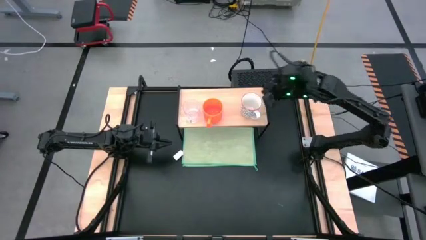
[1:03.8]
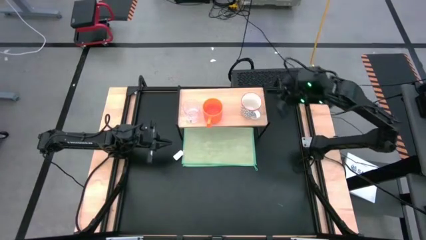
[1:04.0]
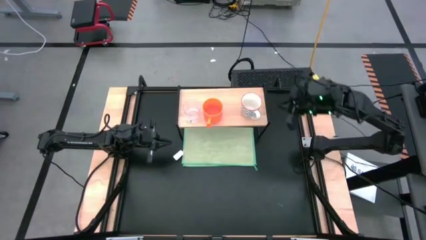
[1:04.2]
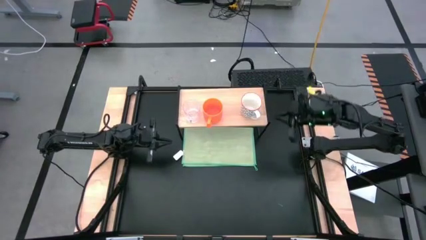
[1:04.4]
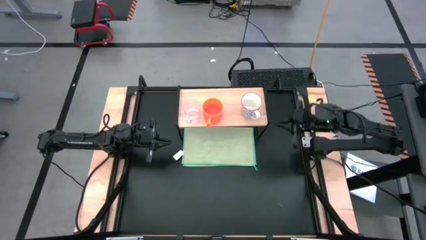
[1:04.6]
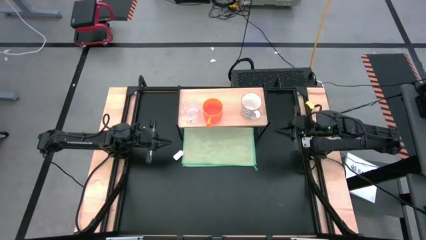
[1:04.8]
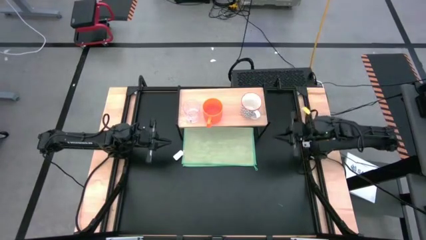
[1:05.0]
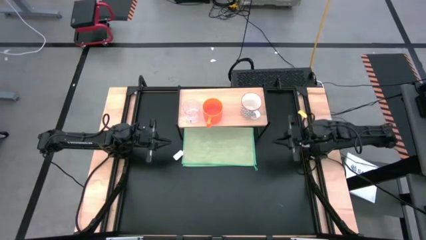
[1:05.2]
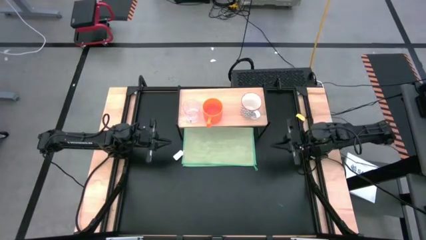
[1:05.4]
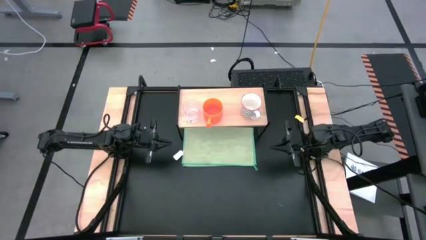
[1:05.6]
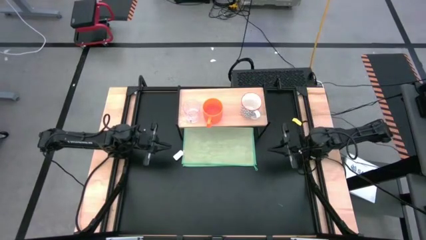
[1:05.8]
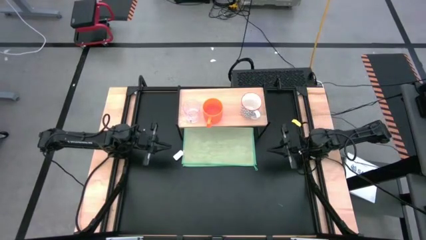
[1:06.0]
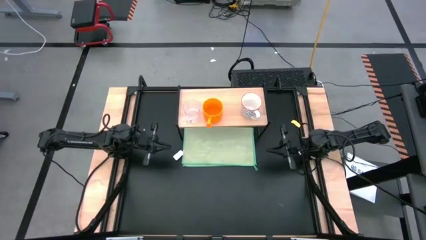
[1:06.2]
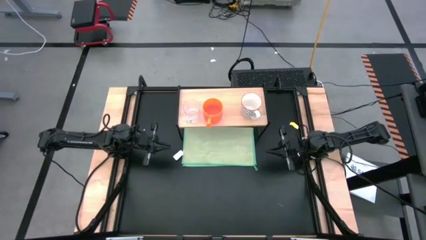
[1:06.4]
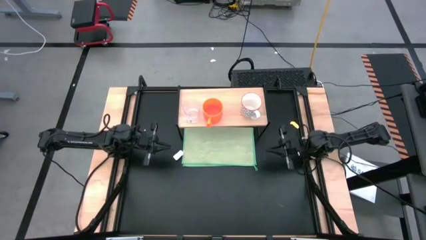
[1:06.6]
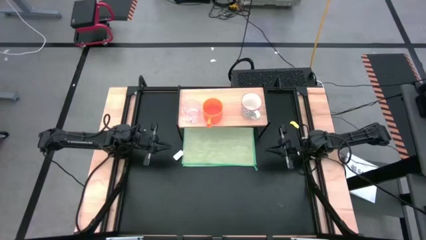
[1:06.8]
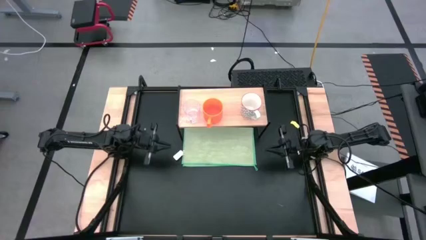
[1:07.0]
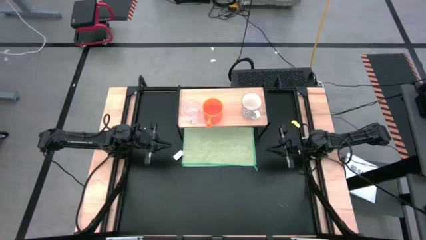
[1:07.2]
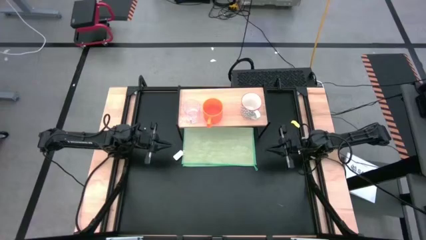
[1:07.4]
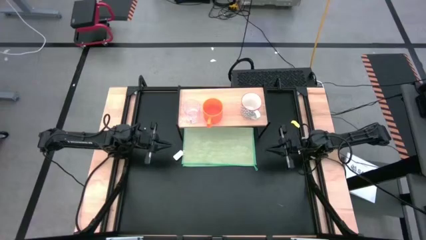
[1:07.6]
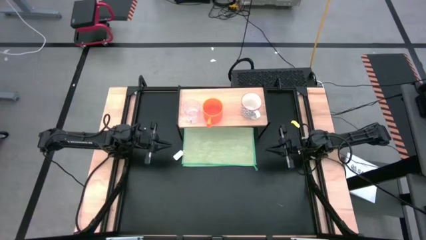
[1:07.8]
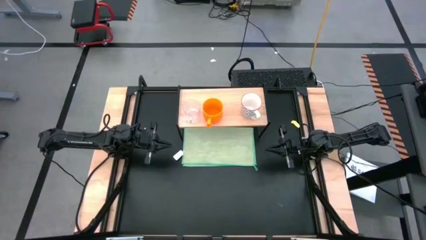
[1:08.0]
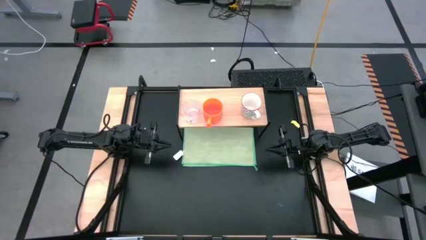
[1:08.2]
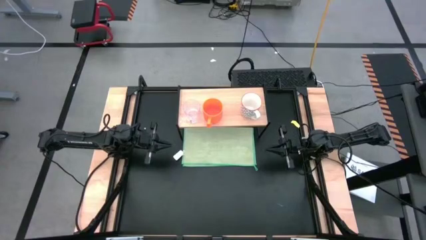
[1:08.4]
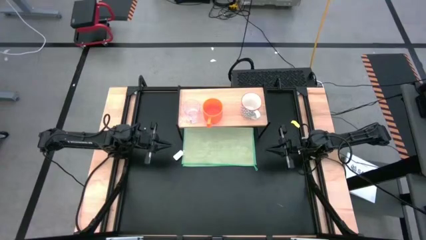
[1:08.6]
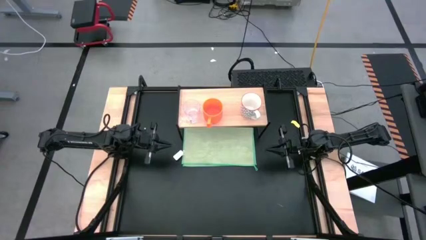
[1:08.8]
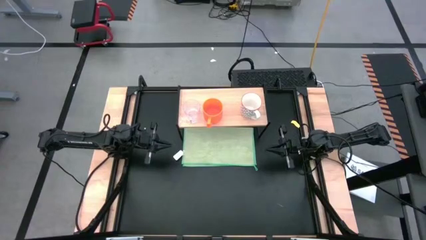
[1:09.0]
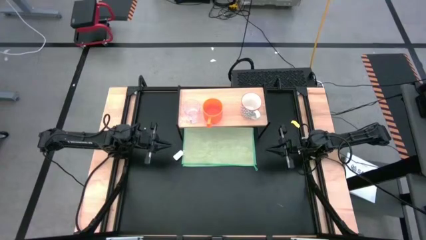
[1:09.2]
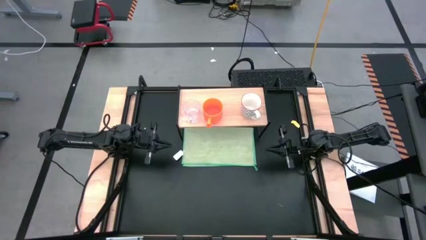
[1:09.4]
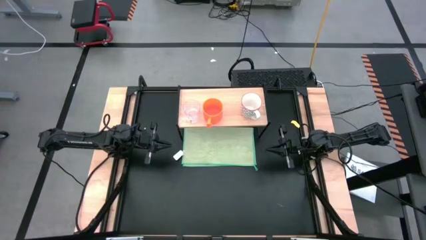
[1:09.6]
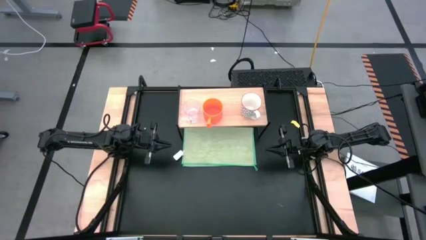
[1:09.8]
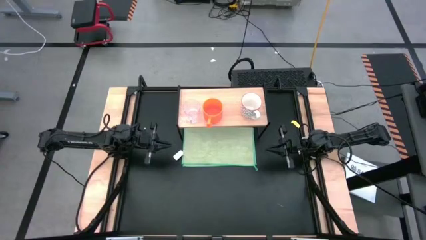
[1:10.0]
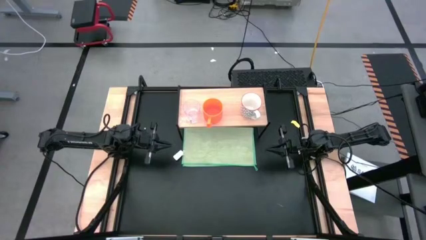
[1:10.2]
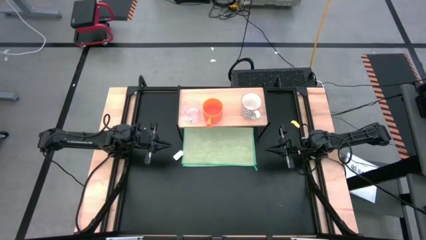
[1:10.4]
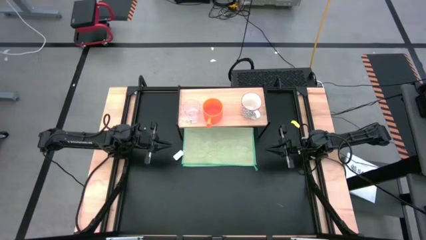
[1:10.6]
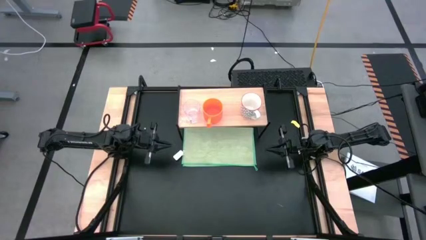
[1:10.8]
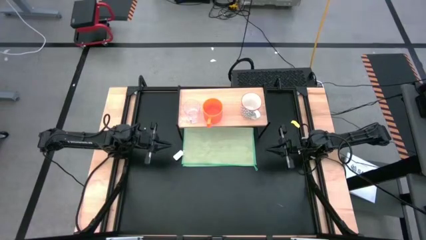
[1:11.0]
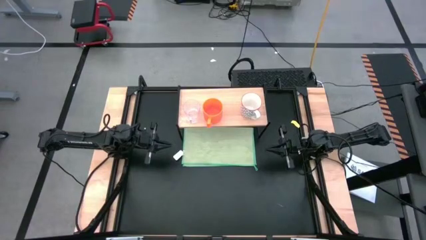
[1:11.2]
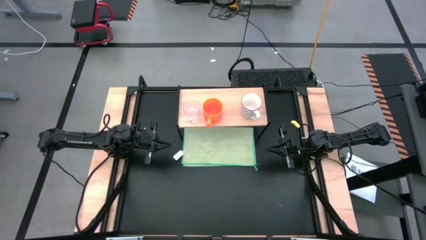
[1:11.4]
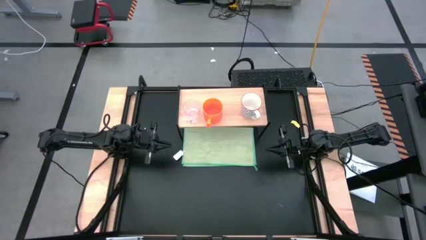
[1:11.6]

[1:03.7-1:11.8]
Task: Stack small to large cups/mugs on shelf
Return to Home Position

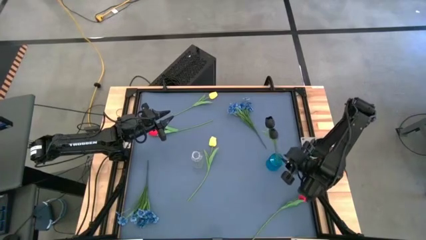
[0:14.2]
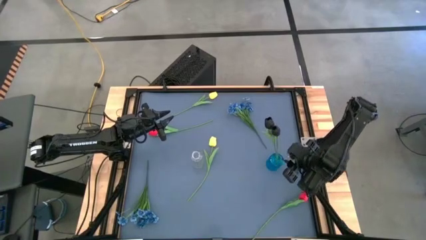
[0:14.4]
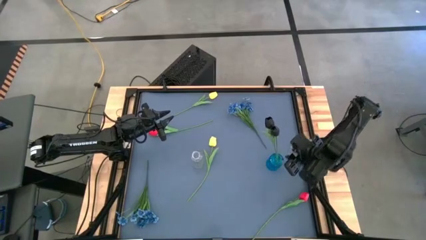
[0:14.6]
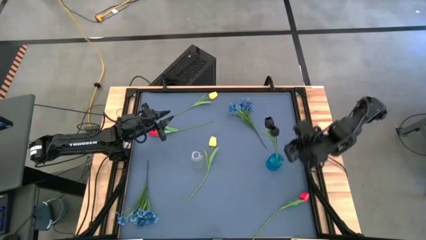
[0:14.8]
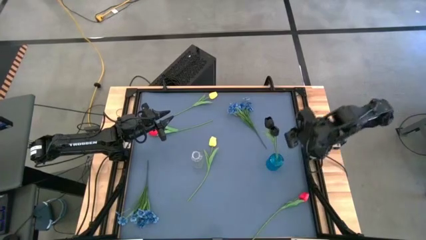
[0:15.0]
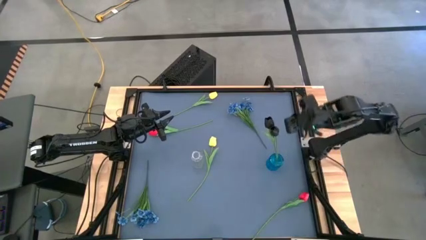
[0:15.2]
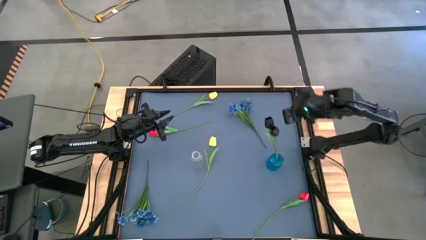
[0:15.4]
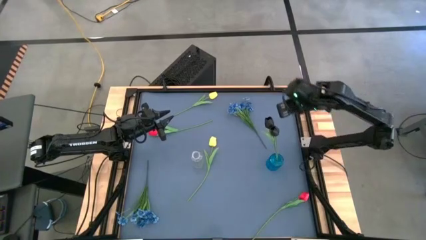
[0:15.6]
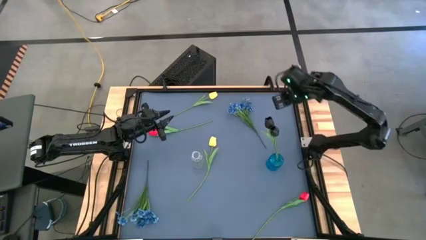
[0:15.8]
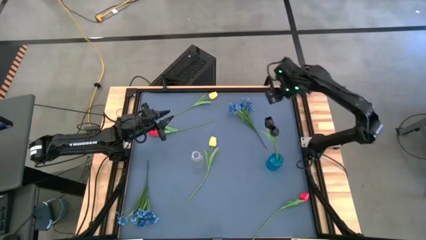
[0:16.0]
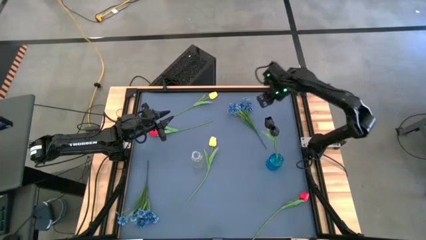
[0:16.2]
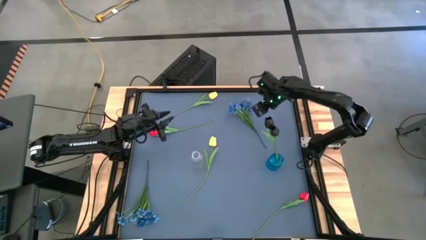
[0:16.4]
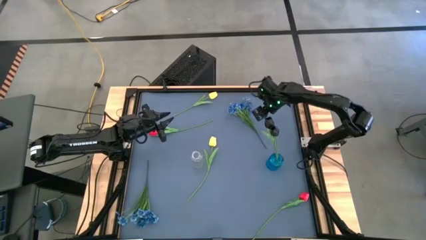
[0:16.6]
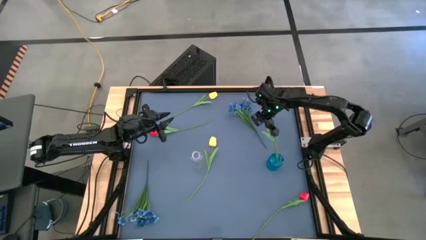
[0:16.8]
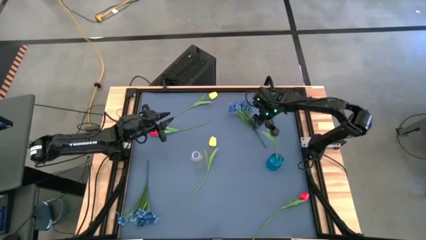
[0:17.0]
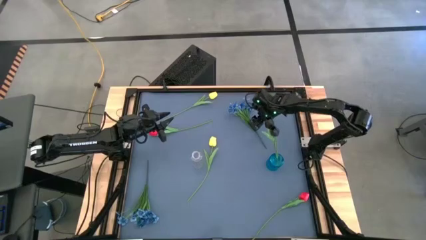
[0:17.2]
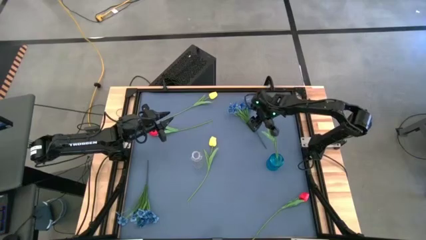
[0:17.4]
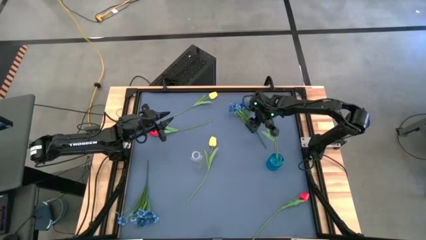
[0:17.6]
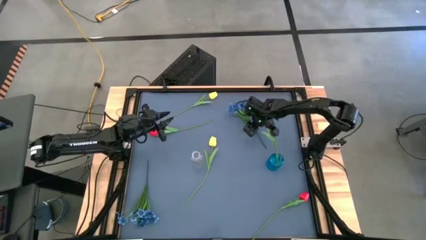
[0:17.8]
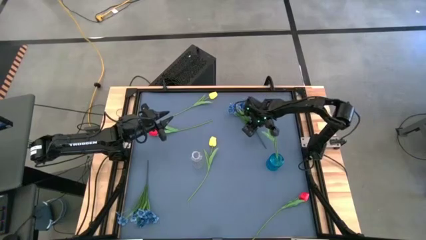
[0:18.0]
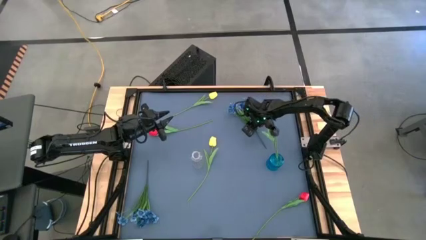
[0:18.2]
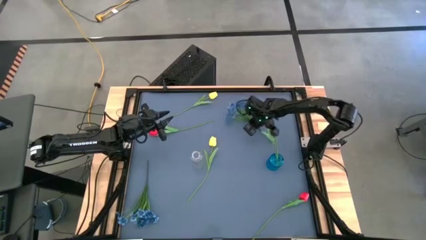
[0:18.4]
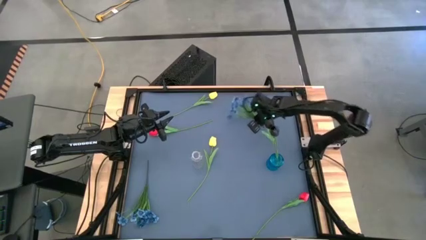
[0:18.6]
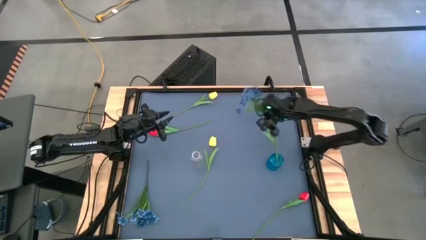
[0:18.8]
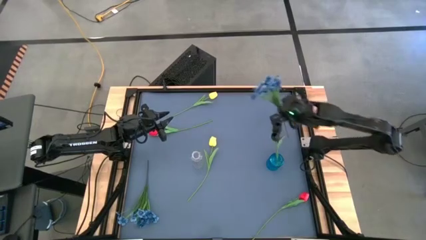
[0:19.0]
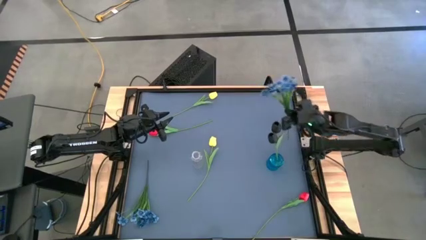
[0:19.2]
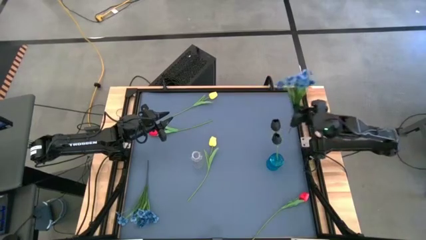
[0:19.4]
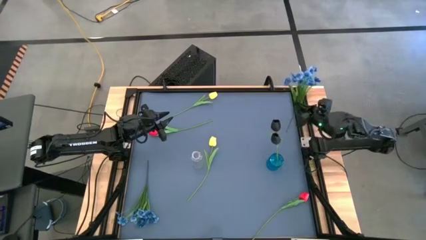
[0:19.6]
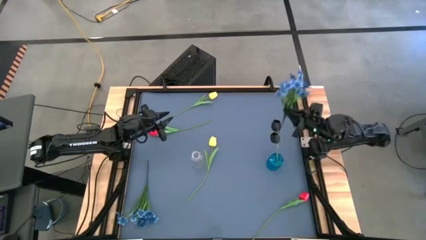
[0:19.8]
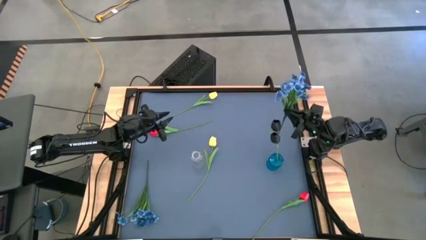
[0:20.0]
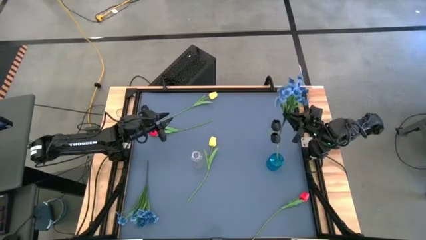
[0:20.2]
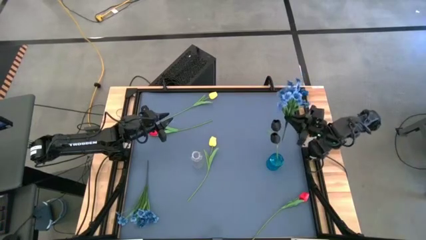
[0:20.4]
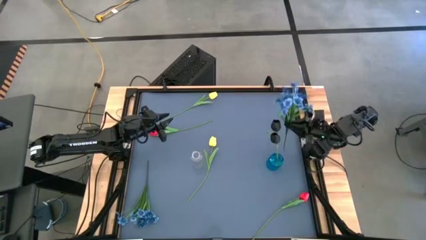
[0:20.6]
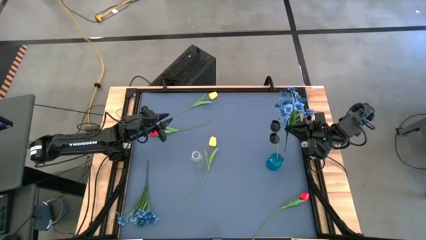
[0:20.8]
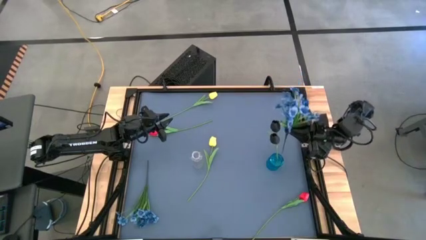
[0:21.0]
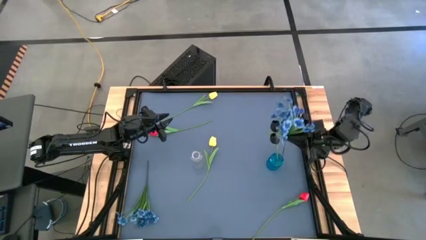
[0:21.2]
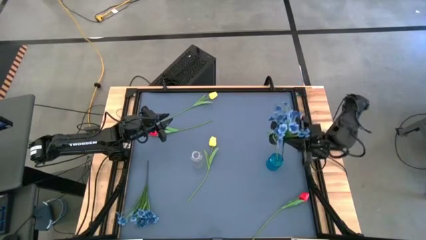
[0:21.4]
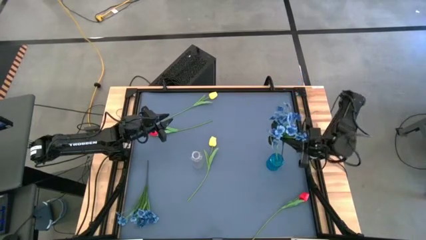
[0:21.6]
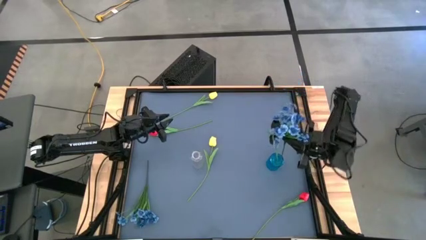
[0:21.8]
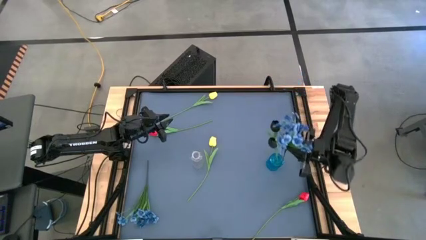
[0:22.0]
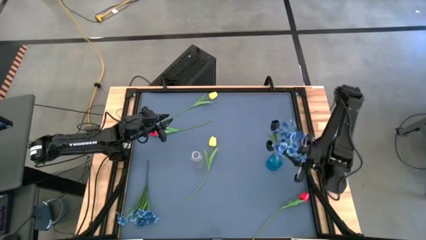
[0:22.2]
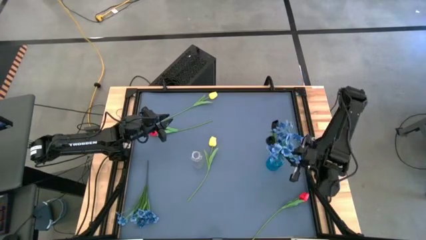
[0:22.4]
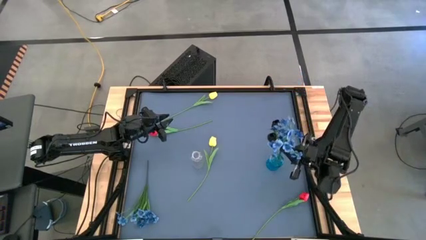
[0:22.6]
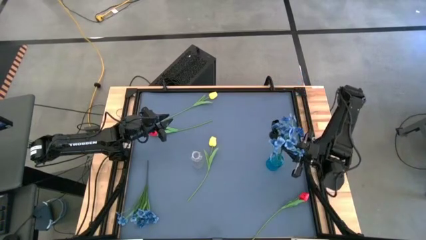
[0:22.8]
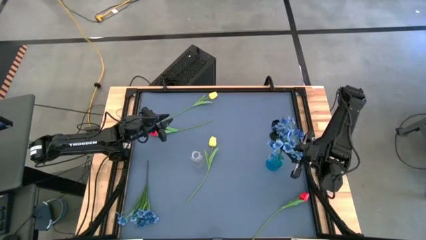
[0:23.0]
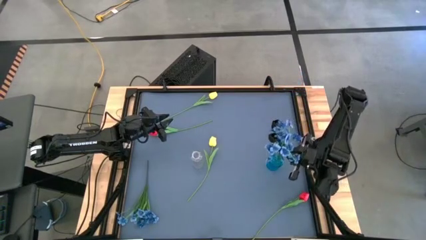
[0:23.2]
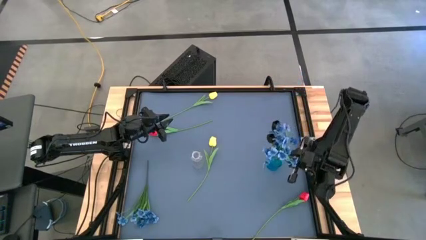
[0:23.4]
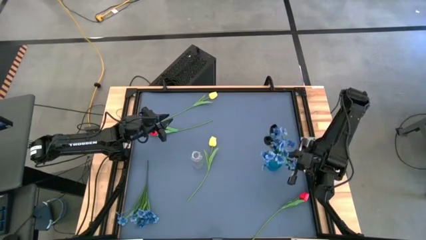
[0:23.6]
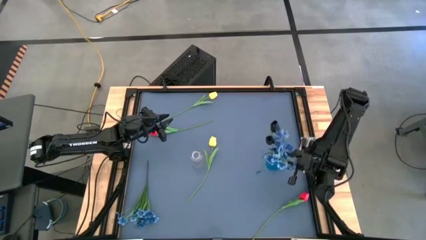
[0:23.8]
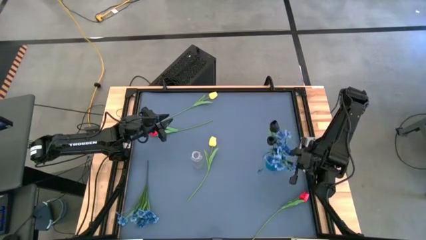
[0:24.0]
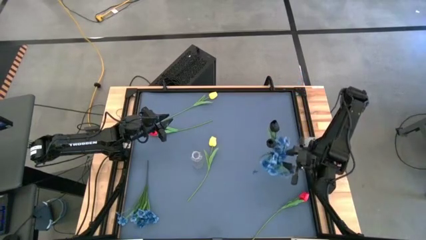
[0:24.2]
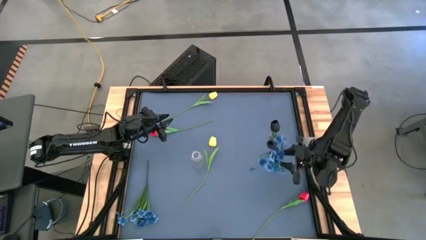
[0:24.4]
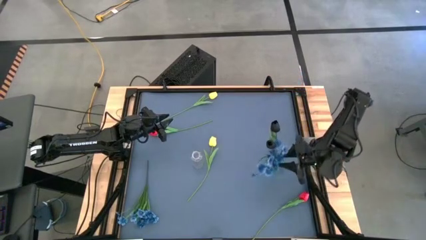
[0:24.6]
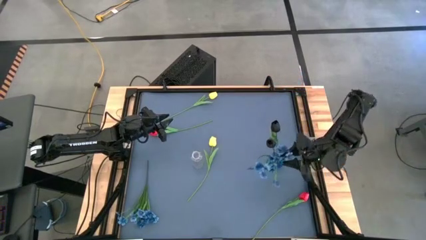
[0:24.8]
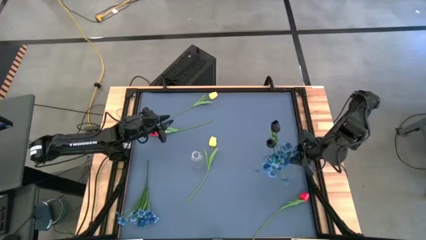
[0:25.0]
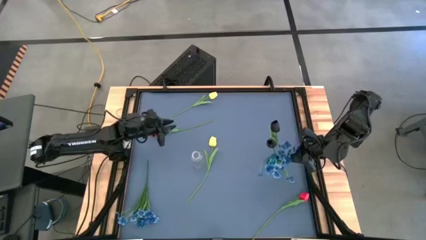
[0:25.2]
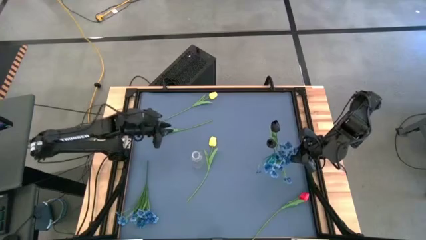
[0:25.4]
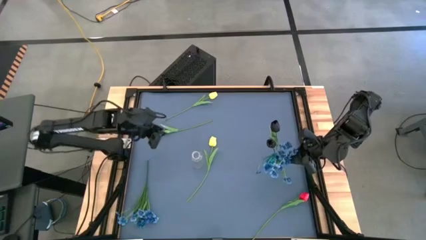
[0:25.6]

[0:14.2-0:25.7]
Task: Sort flowers into vase by color
Put the top blue flowers into the blue vase
